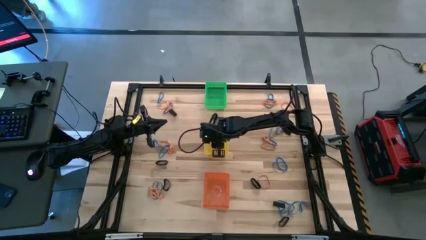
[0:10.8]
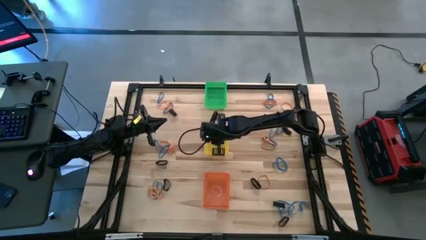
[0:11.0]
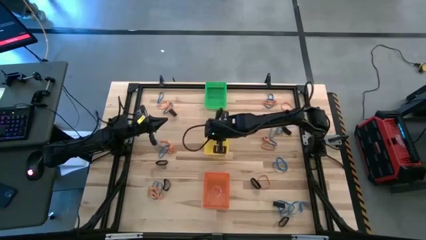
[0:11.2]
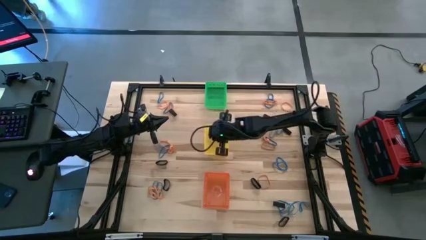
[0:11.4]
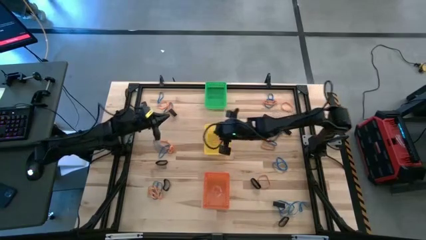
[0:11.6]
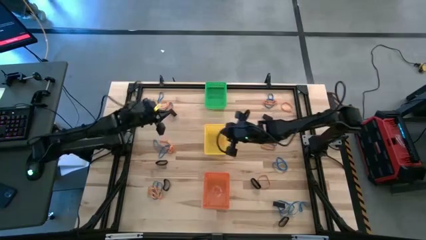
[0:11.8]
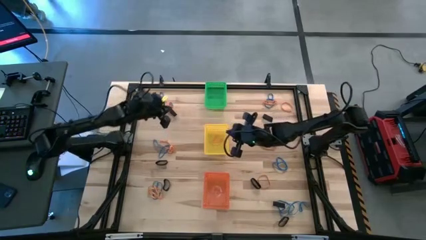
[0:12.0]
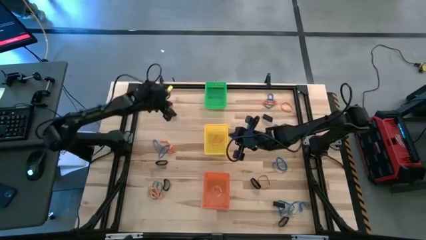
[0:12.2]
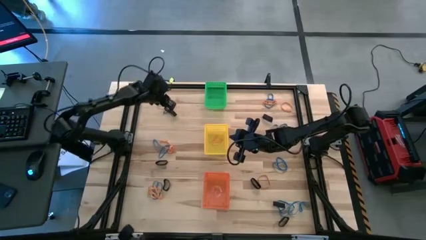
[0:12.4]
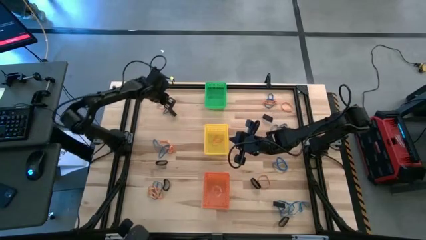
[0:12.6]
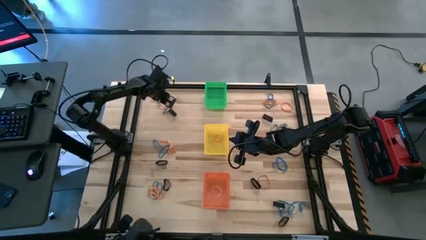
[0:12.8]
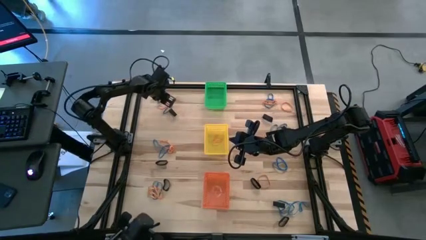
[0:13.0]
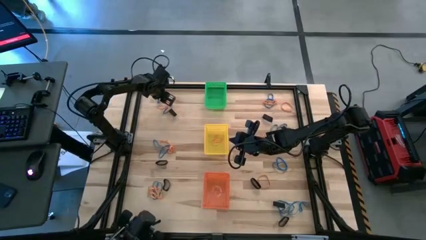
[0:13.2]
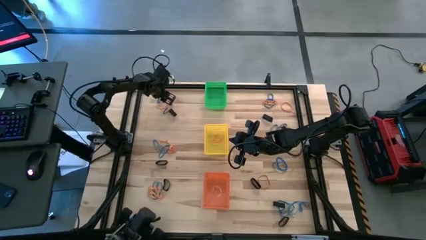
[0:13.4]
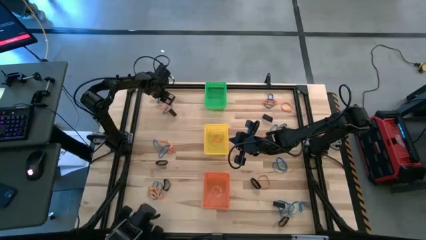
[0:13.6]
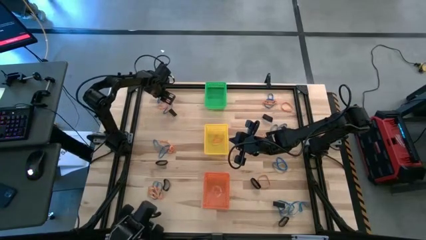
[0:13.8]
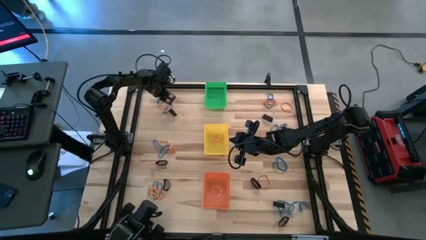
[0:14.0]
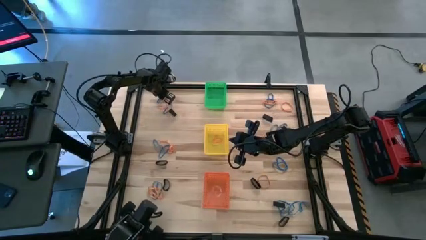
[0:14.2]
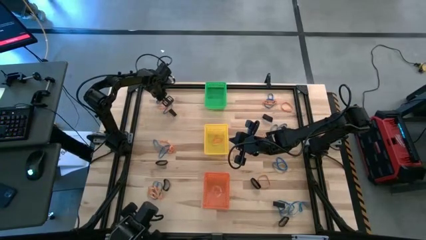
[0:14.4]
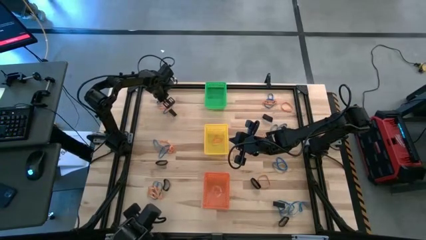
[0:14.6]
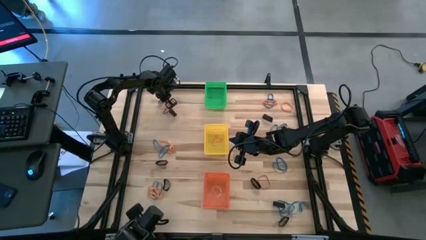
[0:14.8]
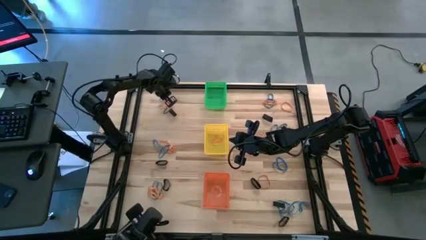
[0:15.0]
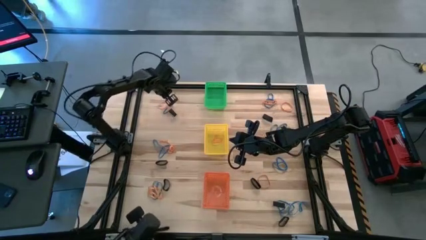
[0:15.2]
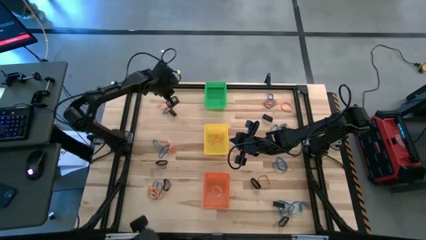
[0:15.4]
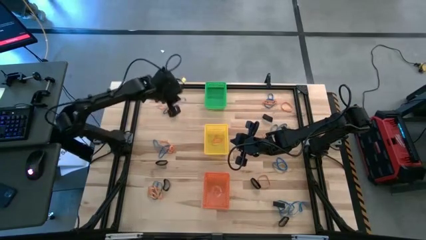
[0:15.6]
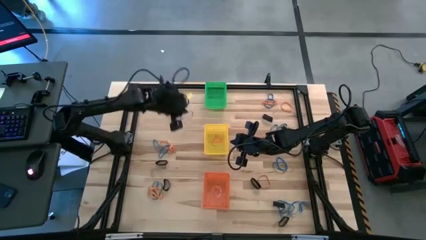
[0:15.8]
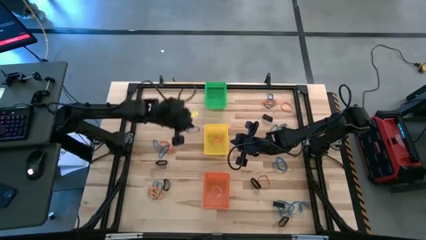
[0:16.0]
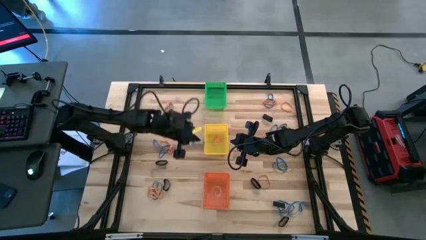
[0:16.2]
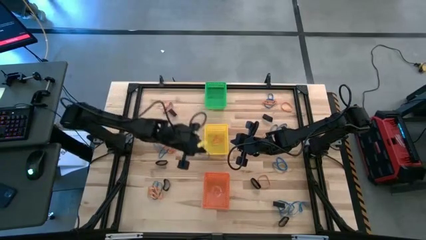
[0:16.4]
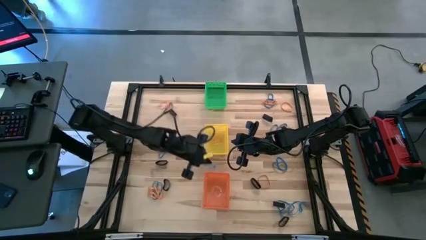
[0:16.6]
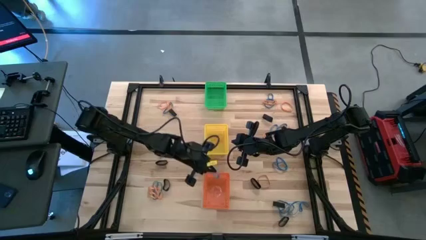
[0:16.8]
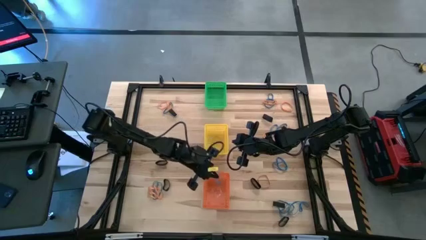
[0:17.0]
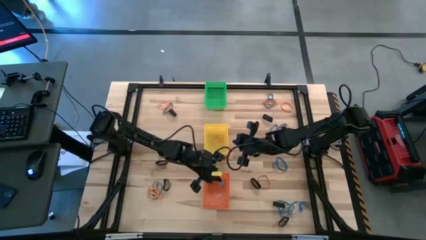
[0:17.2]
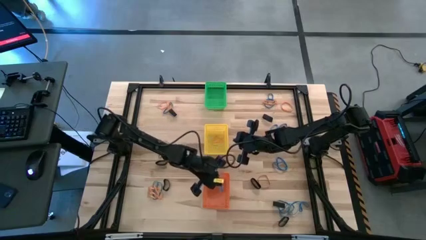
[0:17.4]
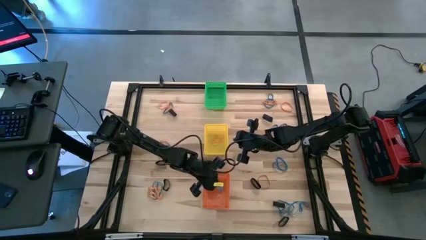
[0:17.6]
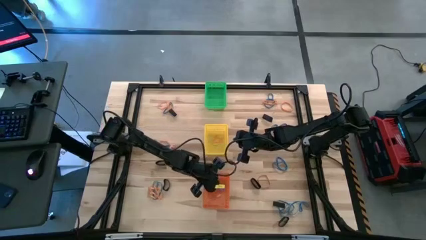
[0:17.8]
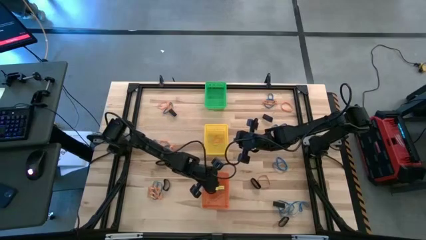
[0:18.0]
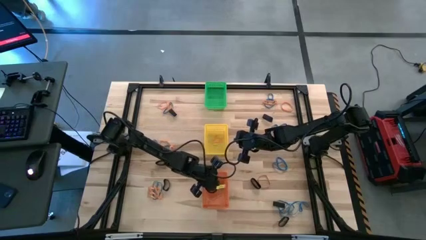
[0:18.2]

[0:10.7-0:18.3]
Task: Sort rubber bands into baskets
Put the blue rubber band into the orange bin

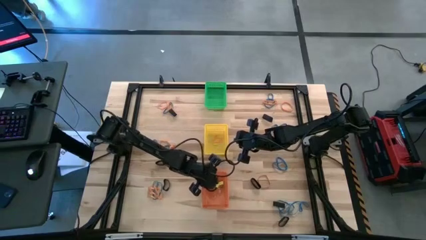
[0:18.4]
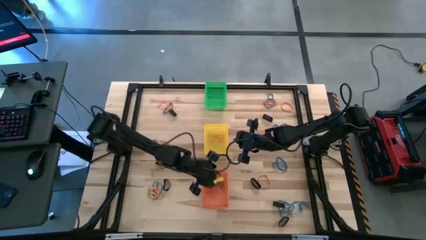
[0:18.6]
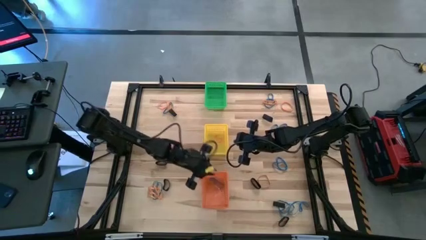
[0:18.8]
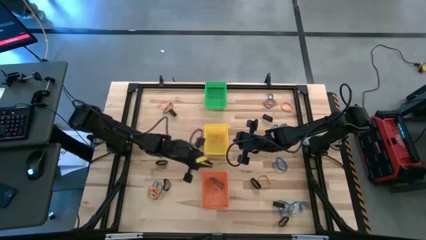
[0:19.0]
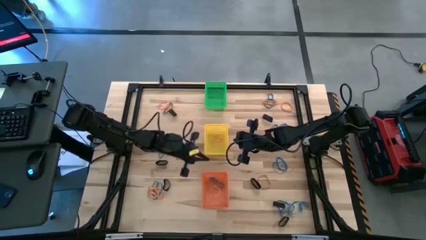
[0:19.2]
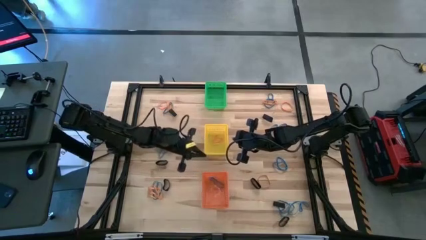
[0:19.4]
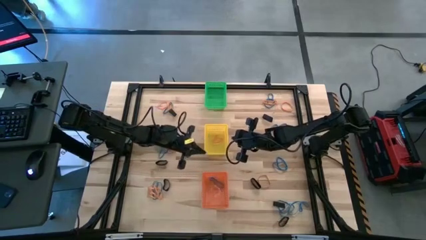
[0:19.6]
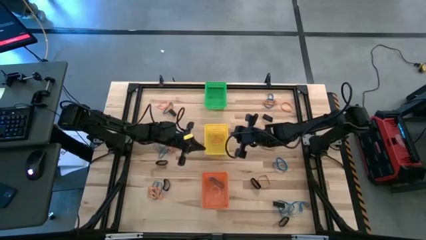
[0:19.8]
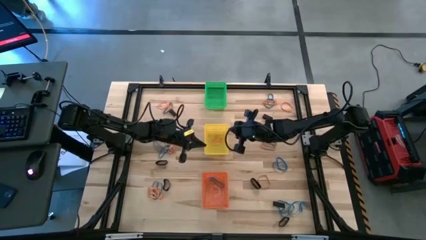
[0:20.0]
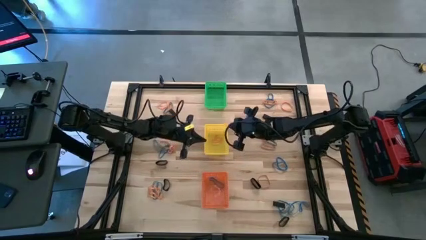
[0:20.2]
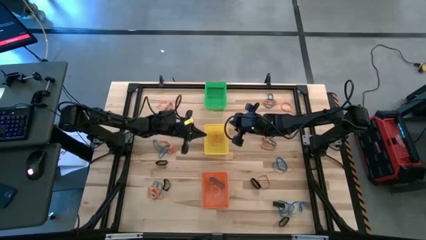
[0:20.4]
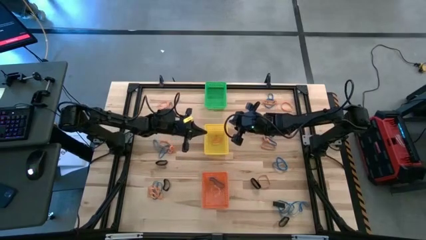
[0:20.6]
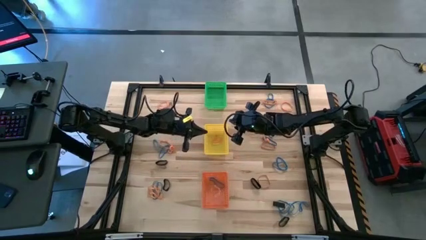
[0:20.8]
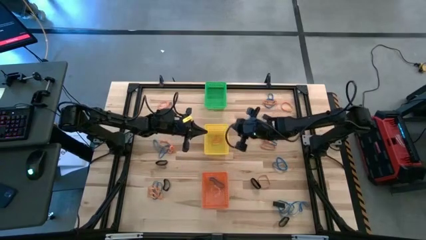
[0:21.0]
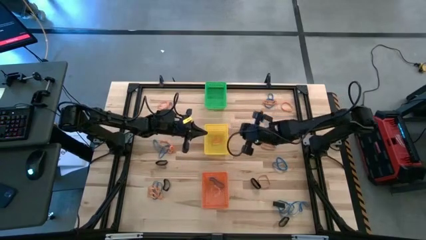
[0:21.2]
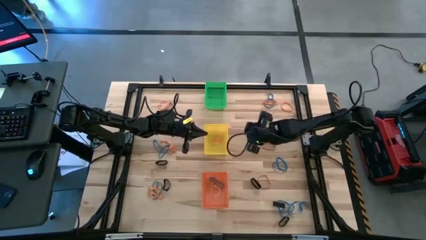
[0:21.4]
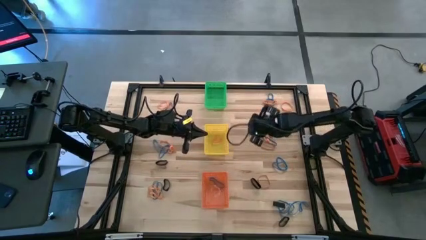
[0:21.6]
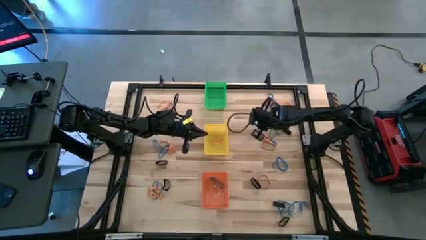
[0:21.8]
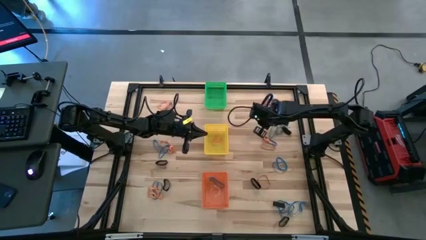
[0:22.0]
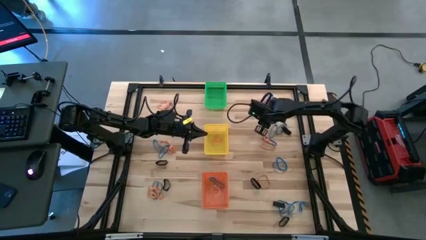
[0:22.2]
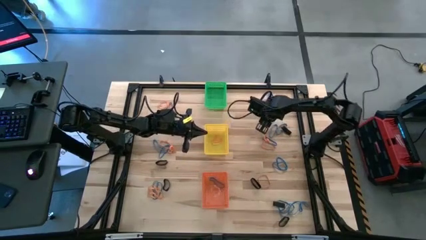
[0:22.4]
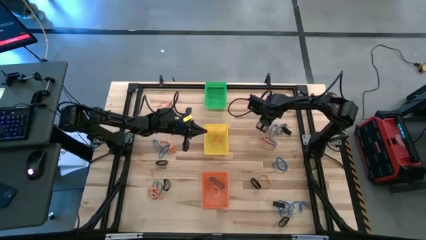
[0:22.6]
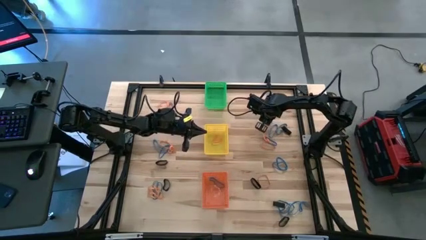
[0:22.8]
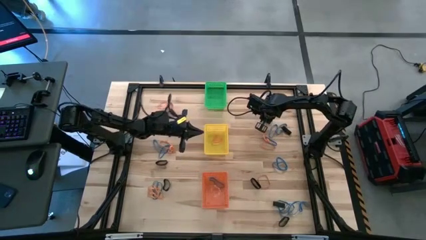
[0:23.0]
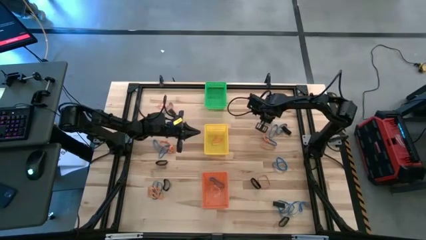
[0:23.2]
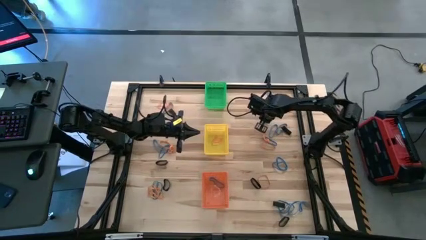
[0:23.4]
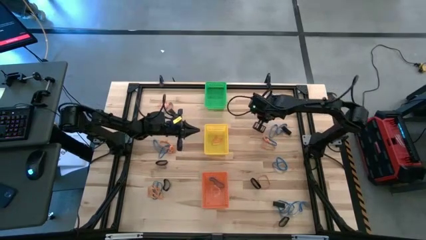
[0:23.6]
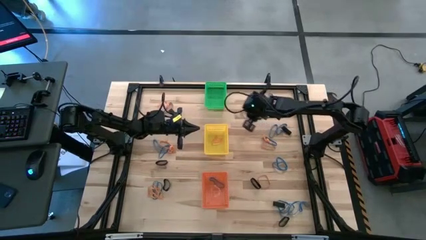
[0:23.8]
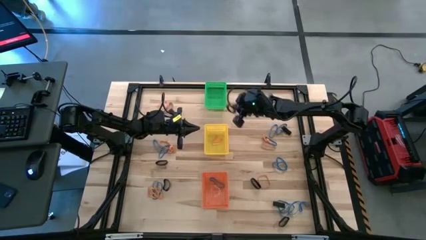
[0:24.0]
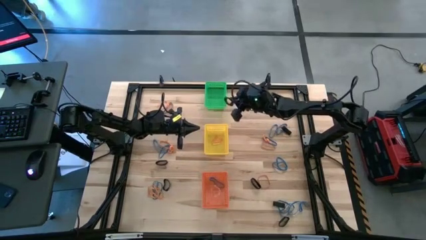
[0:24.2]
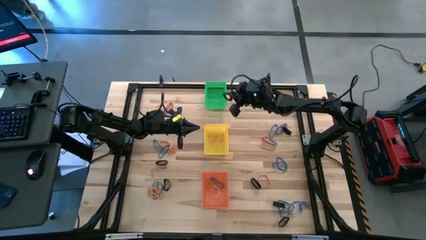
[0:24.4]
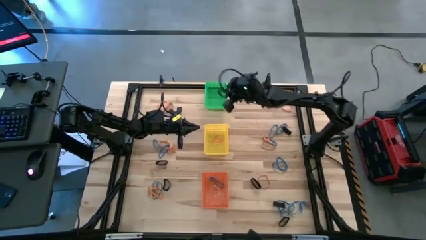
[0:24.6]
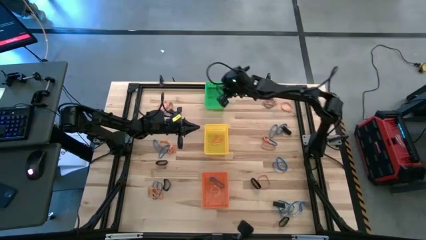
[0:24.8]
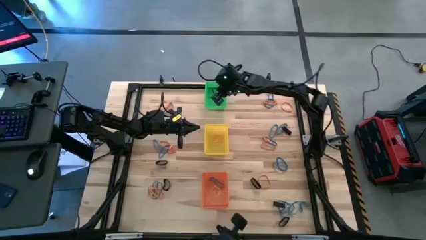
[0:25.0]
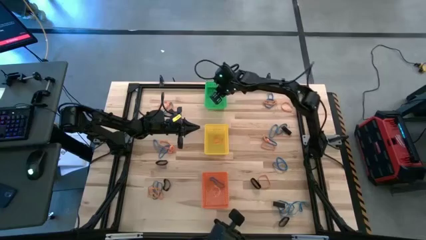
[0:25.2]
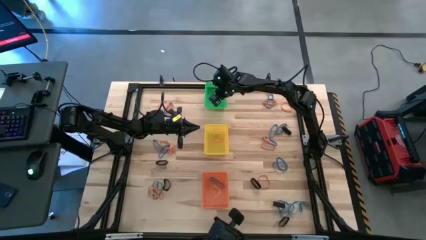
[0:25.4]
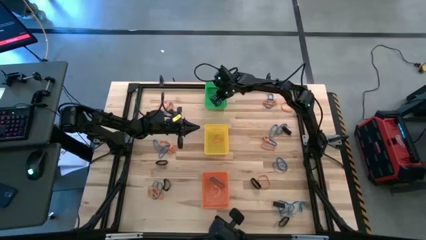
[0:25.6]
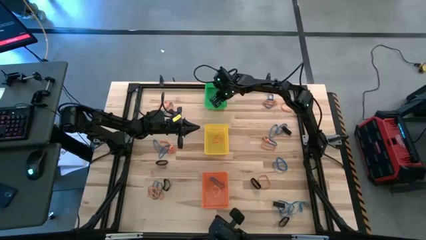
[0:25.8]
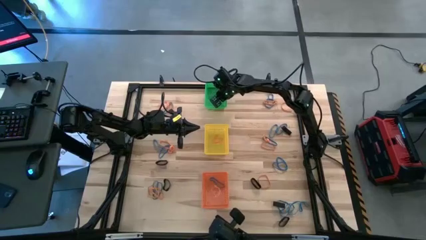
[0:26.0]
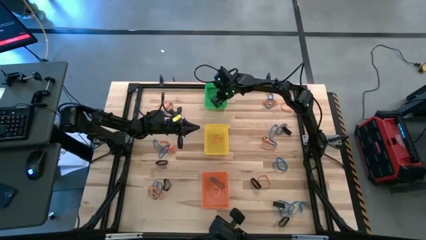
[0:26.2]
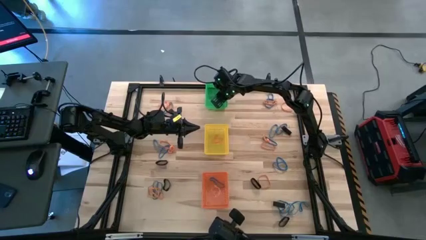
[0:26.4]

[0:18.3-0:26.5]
Put the black rubber band into the green bin

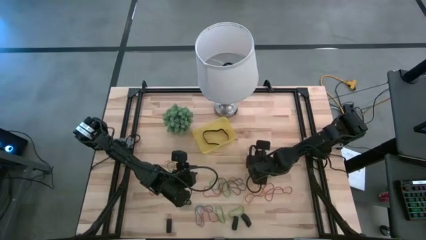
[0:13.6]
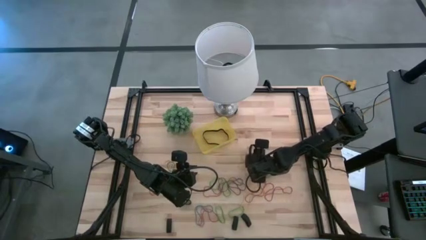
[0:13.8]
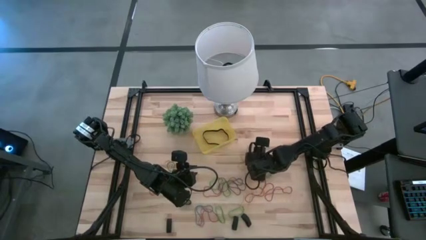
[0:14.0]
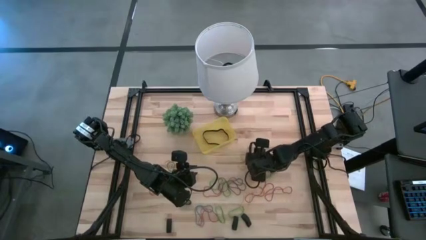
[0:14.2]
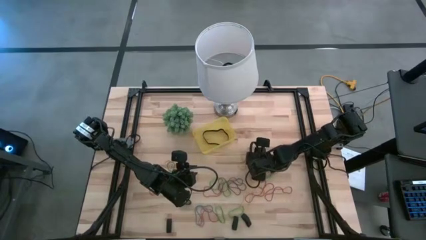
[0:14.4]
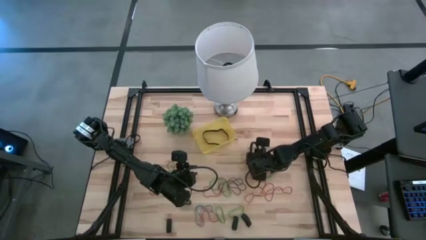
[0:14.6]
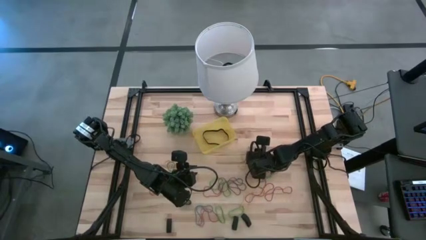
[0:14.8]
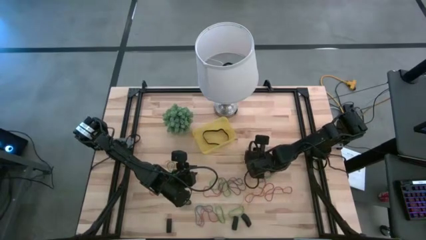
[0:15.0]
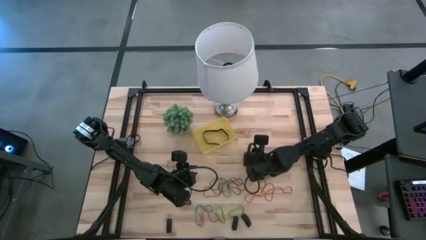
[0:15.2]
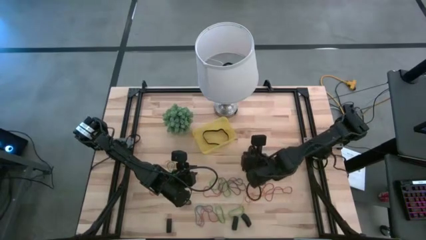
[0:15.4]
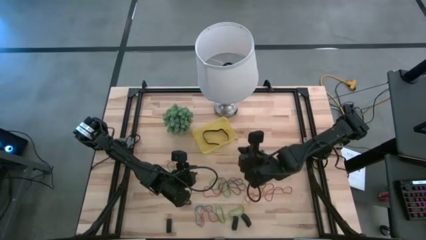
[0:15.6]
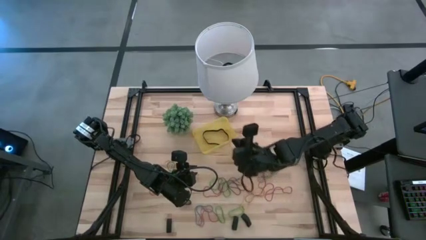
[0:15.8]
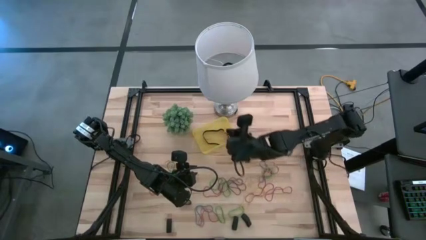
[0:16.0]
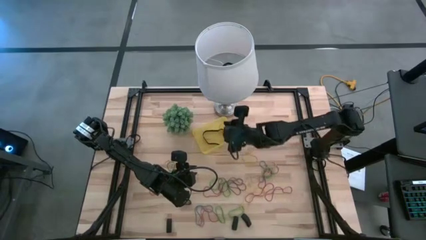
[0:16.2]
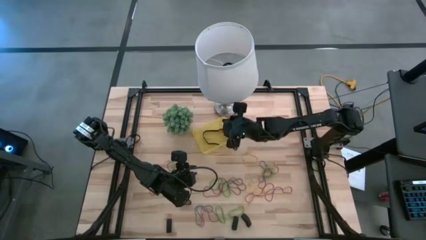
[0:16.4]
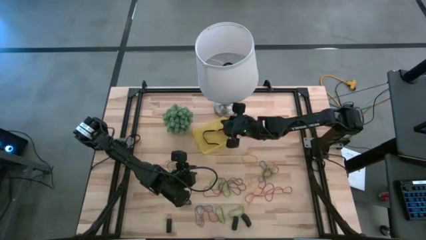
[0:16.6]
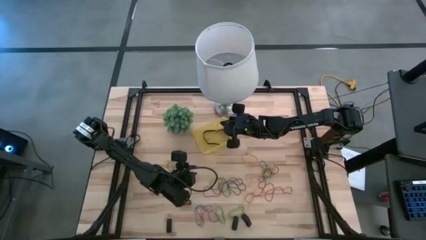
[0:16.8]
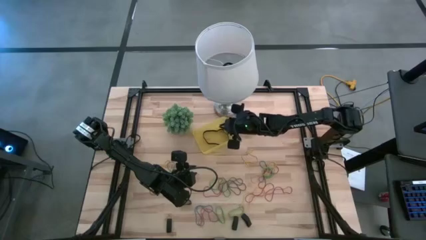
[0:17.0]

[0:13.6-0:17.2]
Task: Pick and place rubber bands into bin
Put the yellow rubber band into the yellow bin
